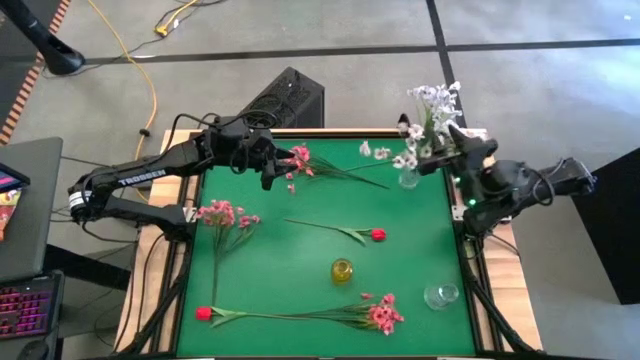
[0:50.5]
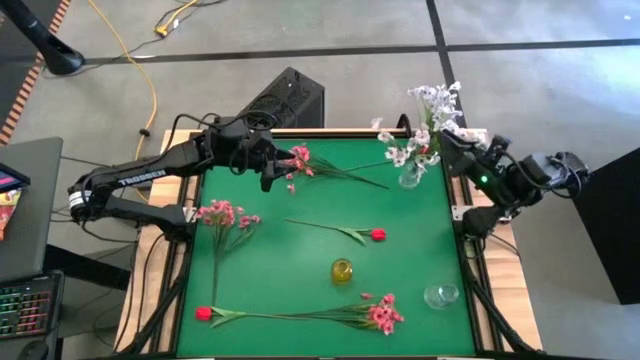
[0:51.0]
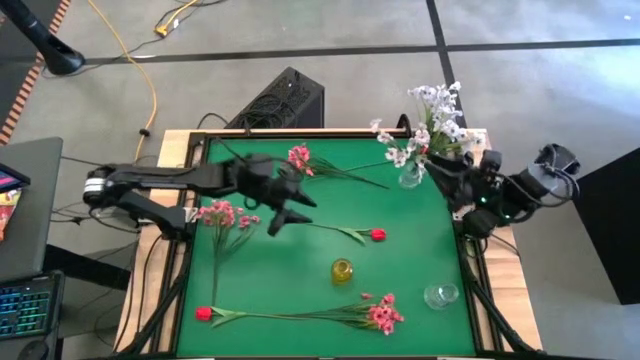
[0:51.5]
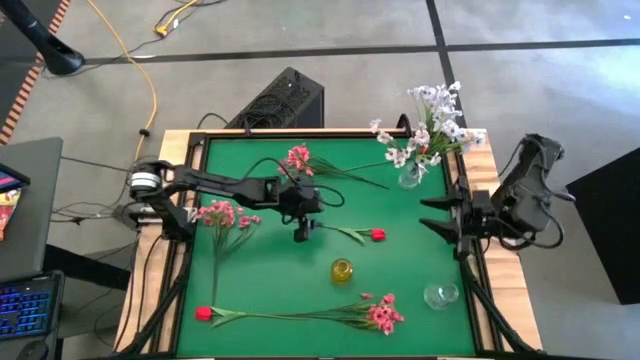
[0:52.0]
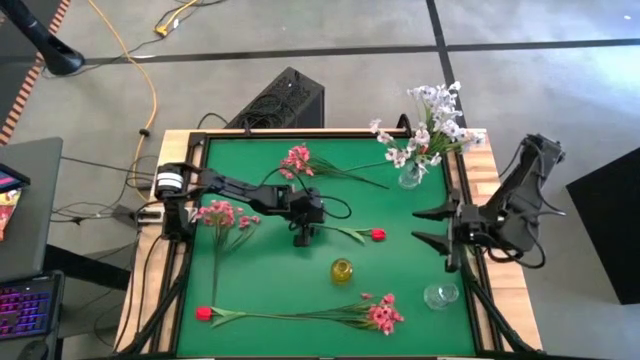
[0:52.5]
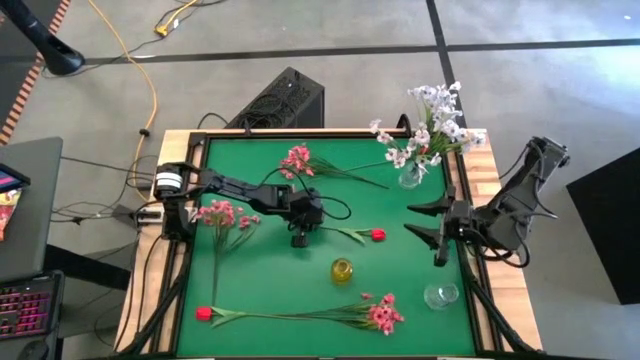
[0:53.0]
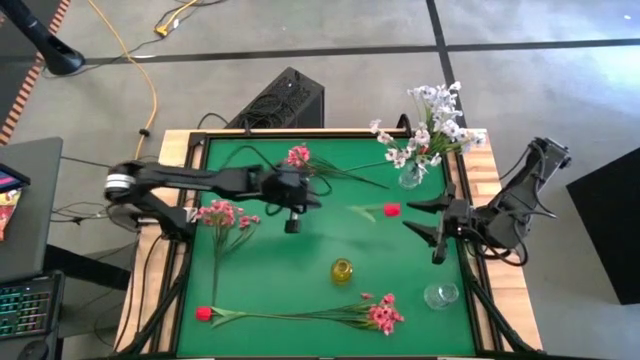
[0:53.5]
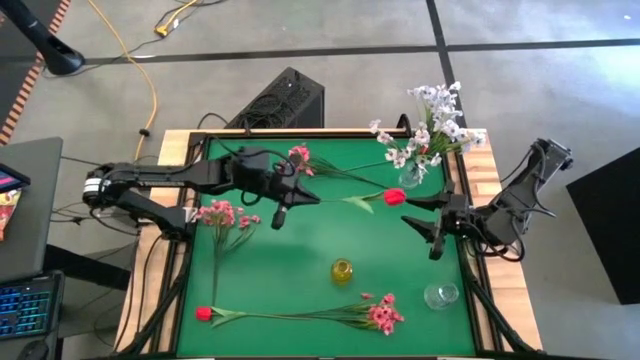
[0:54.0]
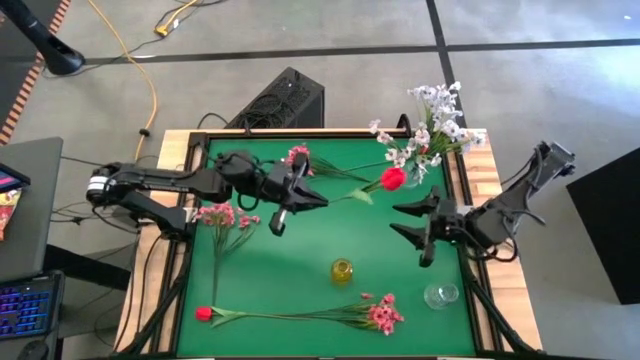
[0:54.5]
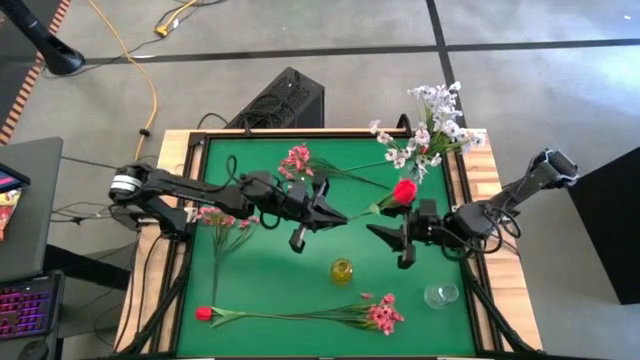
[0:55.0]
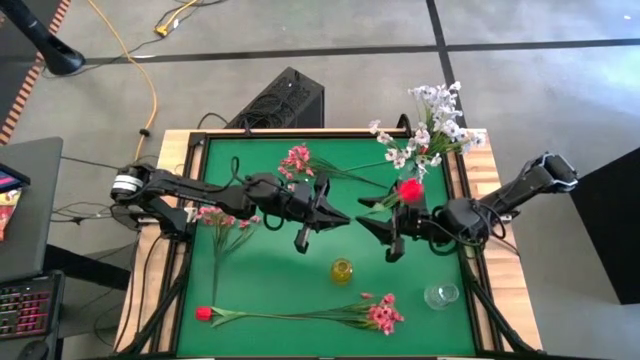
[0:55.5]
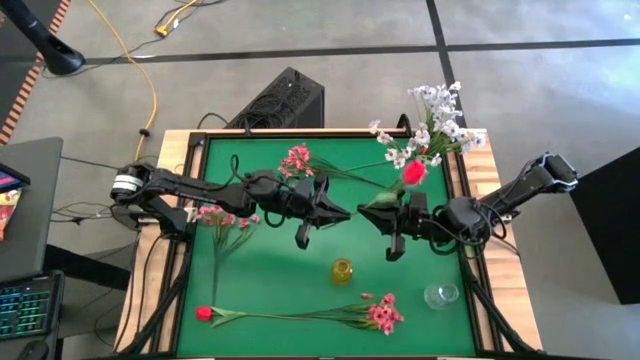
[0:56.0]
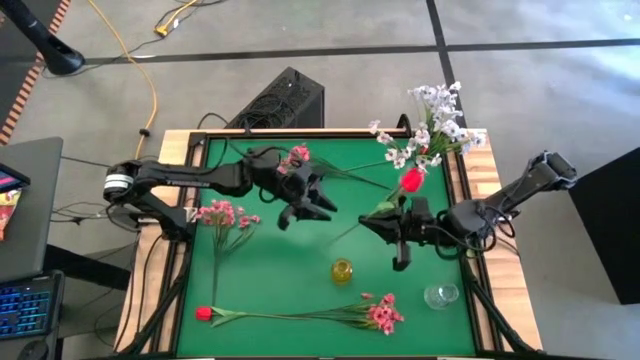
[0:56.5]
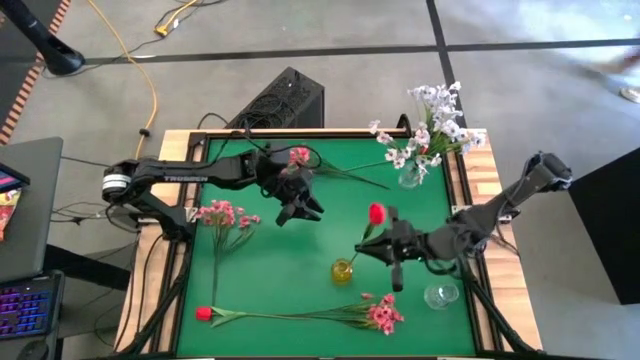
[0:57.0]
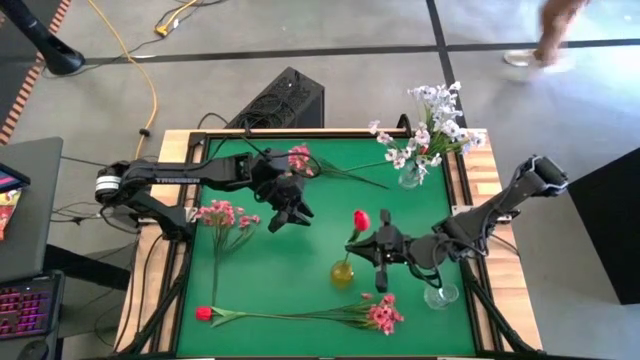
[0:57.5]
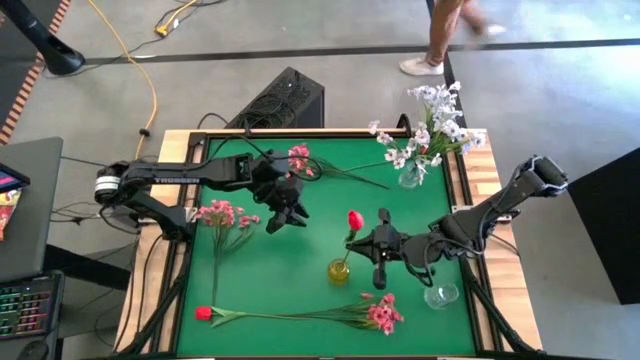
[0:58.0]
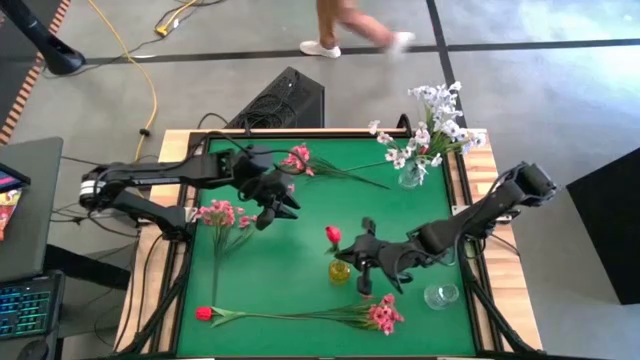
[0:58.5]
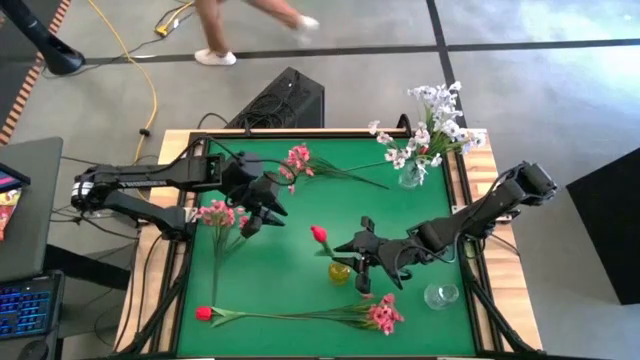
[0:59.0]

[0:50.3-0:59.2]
Task: Sort flowers into vase by color
Put the middle red tulip into the yellow vase

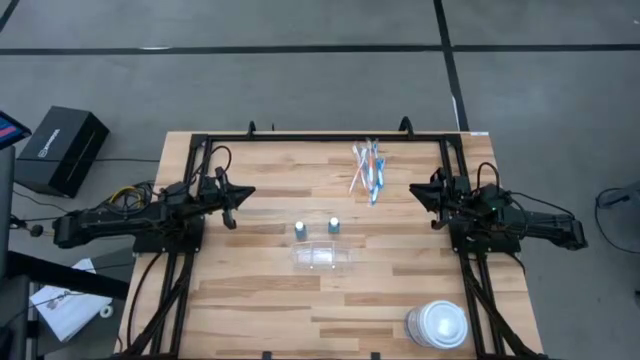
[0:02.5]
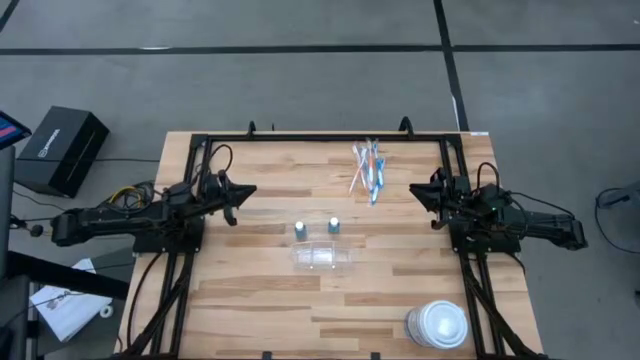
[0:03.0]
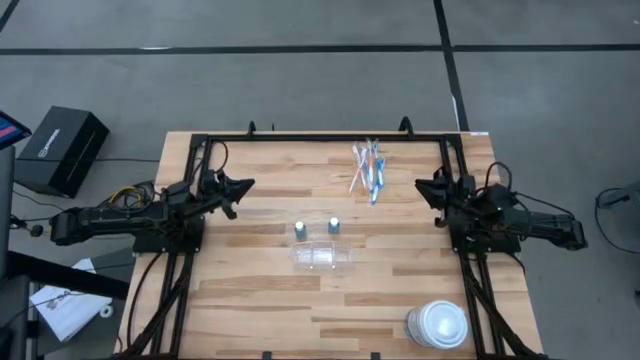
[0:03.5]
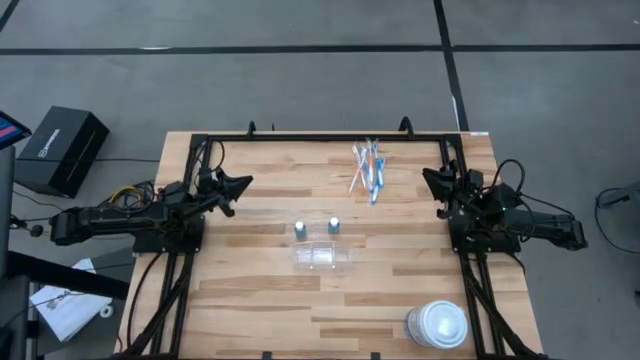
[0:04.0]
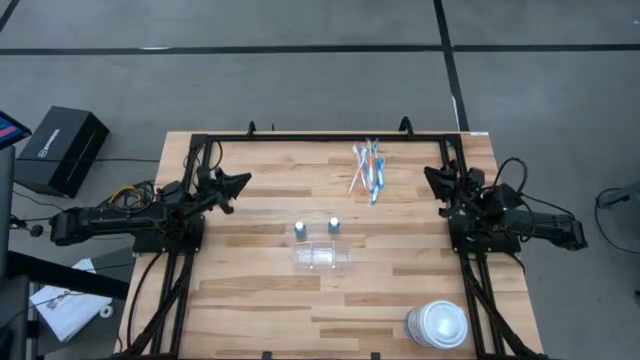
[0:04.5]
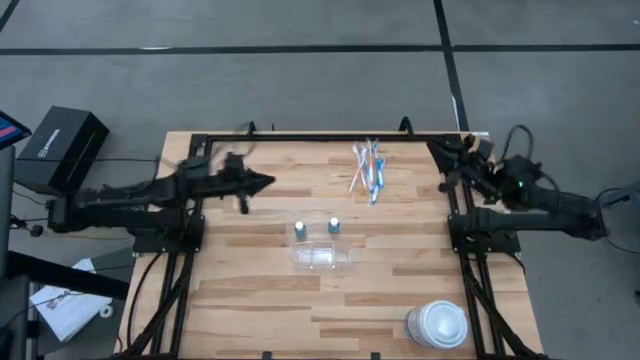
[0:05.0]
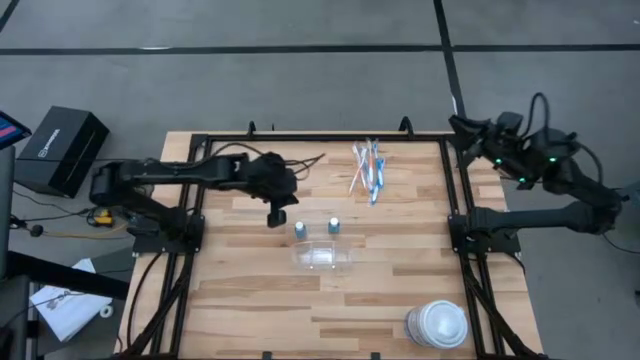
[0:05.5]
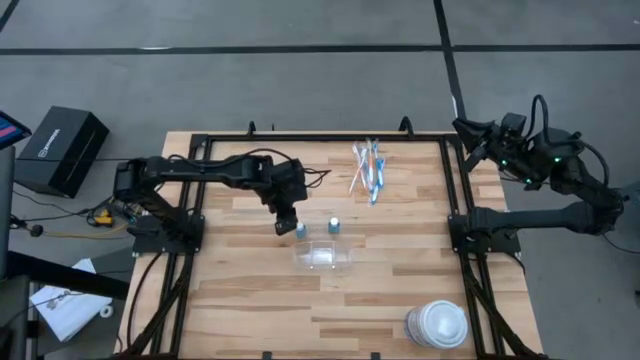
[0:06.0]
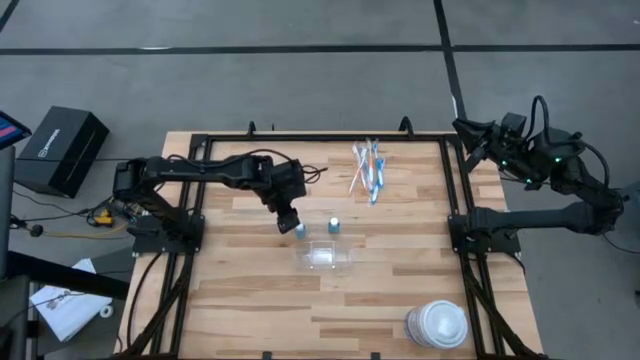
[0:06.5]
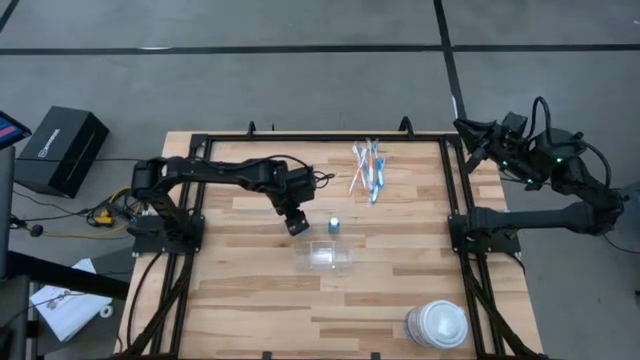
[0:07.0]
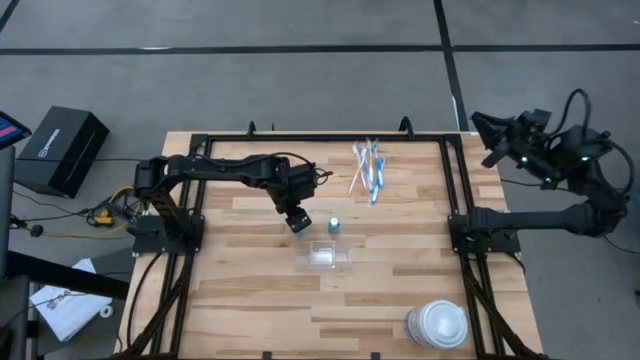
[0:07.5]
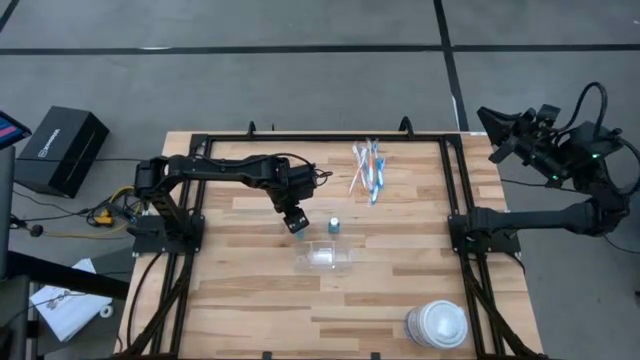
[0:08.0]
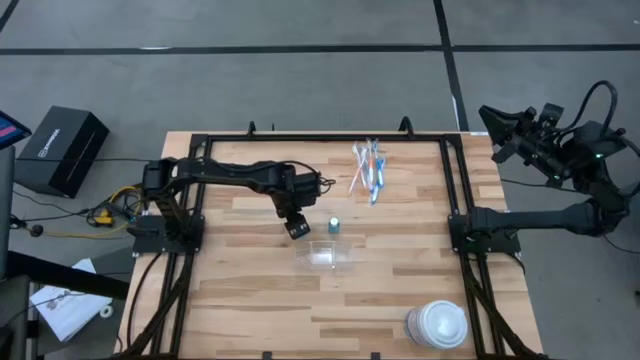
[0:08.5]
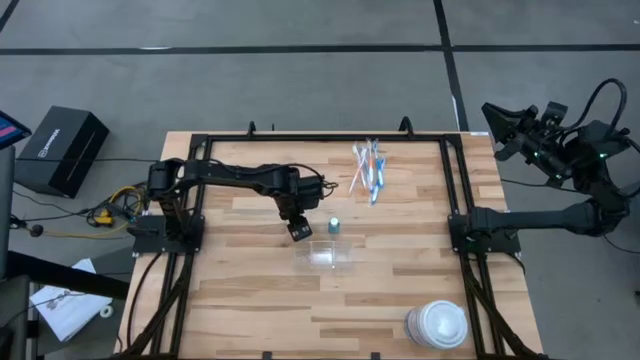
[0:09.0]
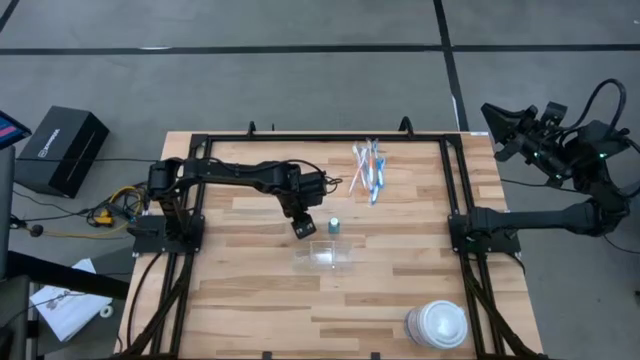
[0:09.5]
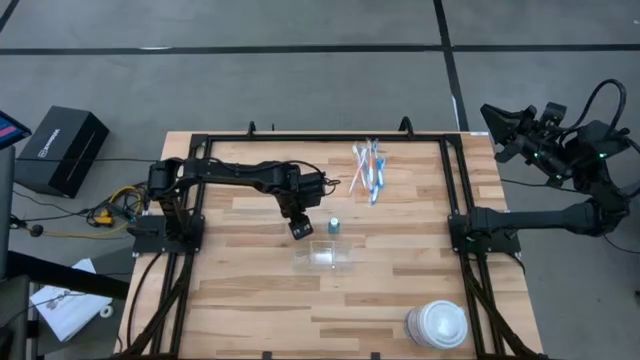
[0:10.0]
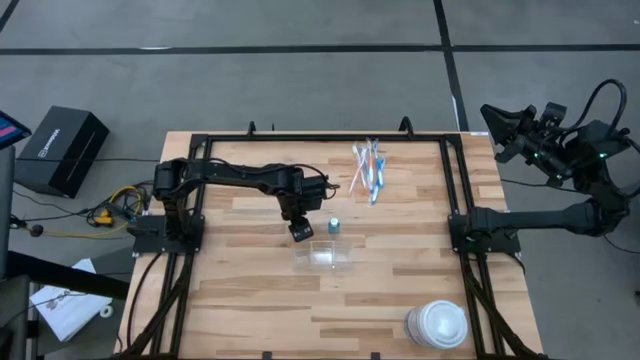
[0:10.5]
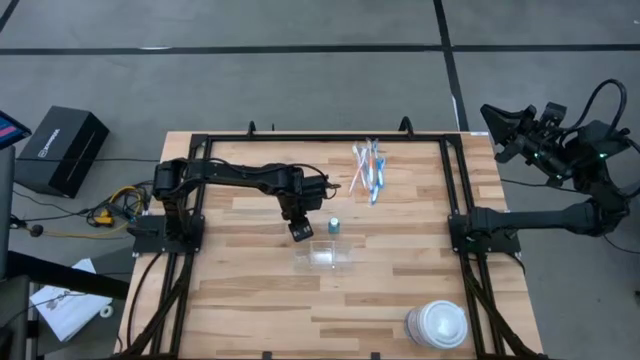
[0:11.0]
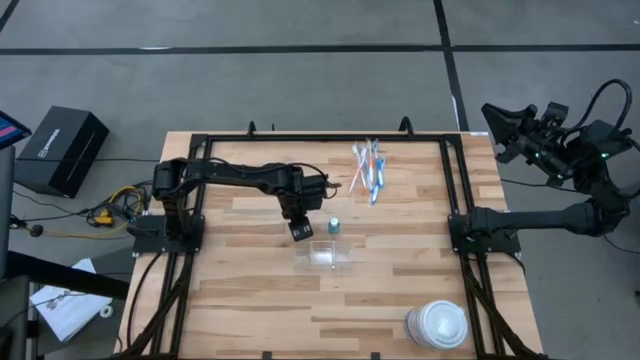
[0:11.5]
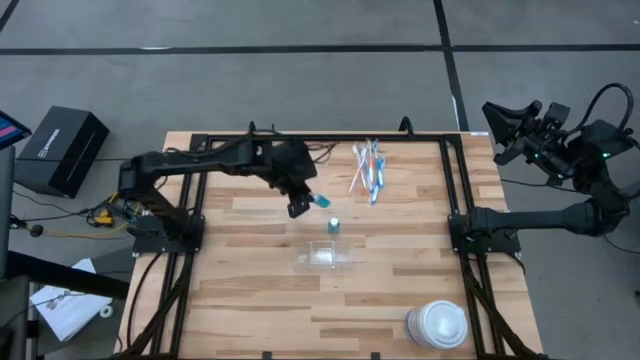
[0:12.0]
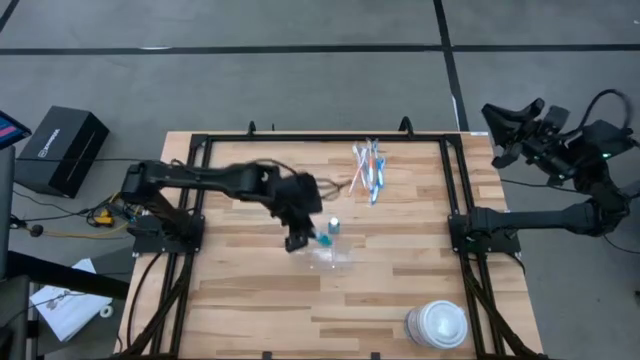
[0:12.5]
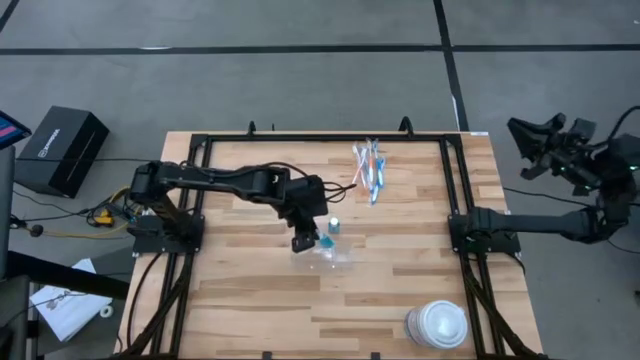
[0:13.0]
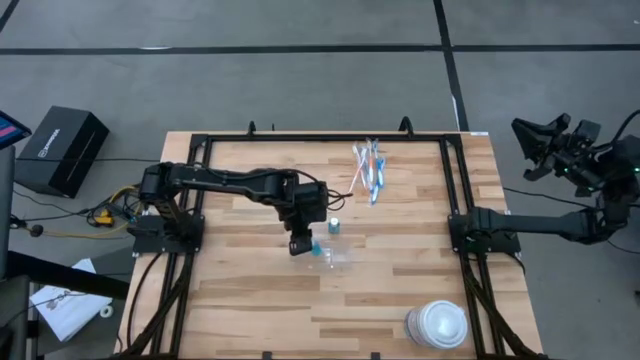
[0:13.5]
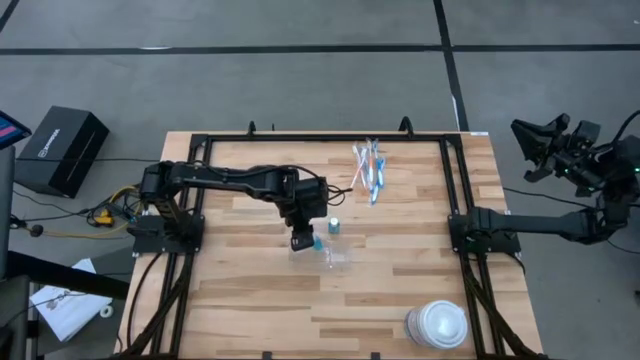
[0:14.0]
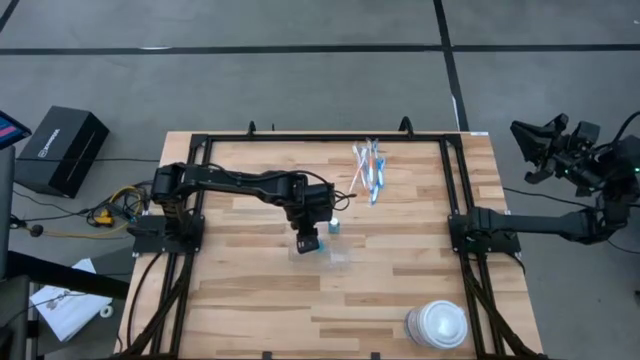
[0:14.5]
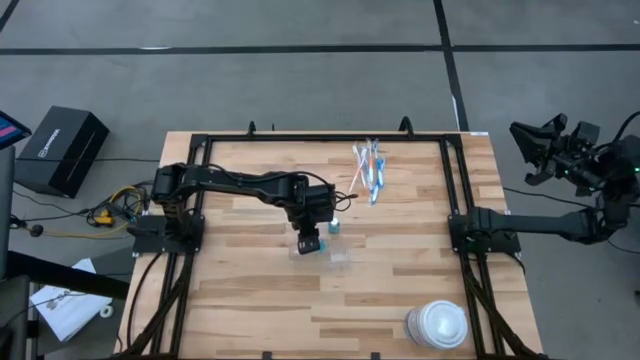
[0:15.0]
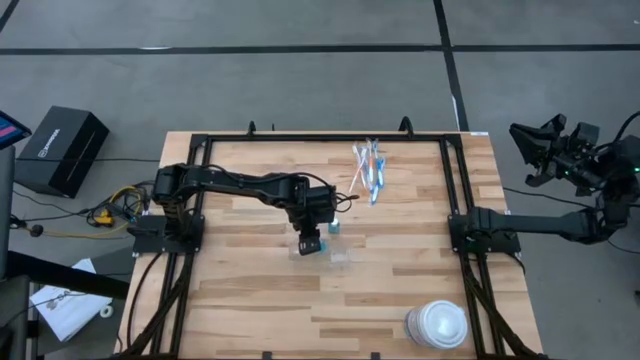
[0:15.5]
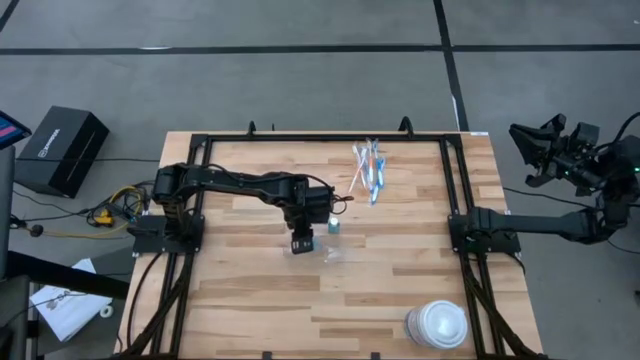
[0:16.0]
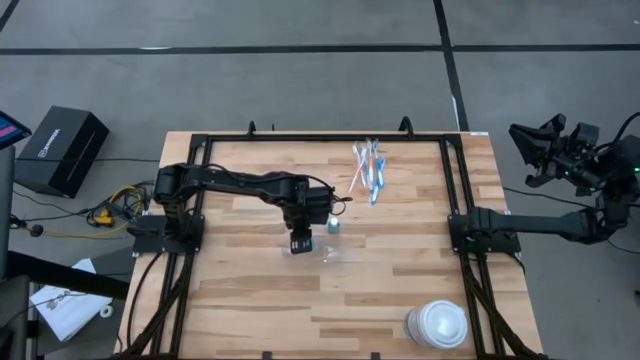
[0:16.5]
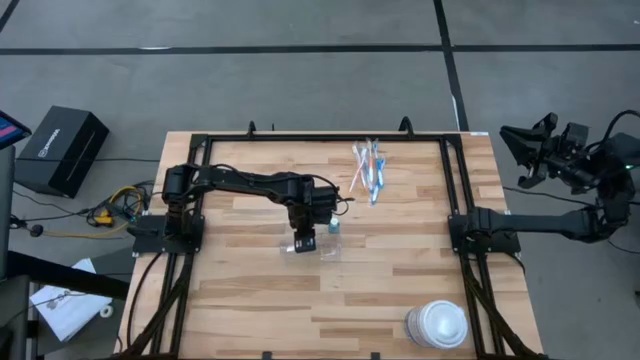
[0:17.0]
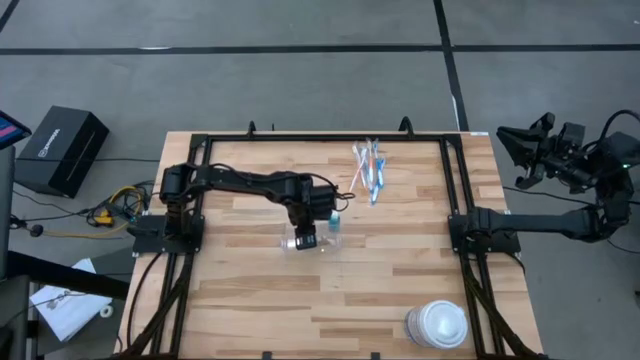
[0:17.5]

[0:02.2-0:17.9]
Task: Pick & Place toothbrushing station
Put the left blue mouthwash into the transparent organizer
